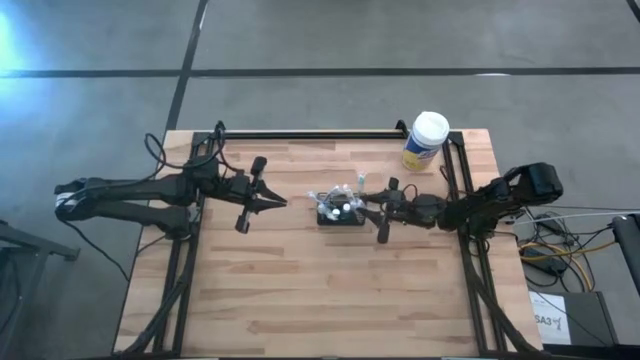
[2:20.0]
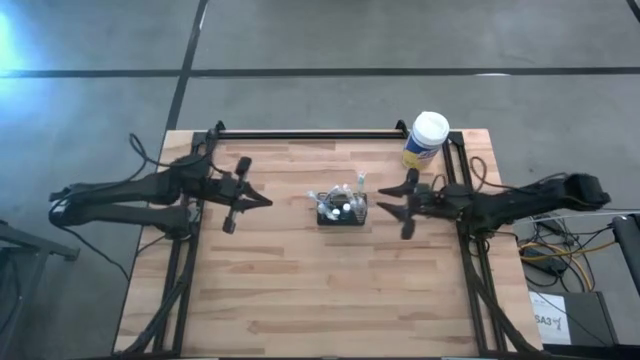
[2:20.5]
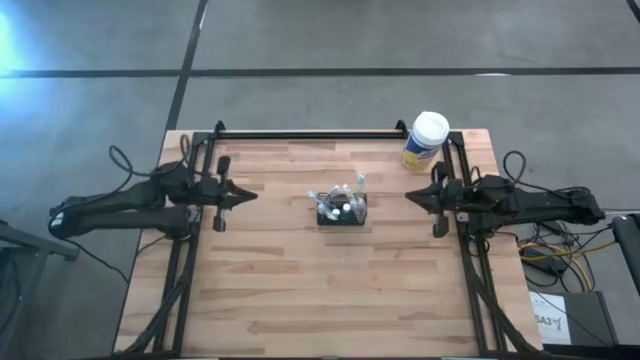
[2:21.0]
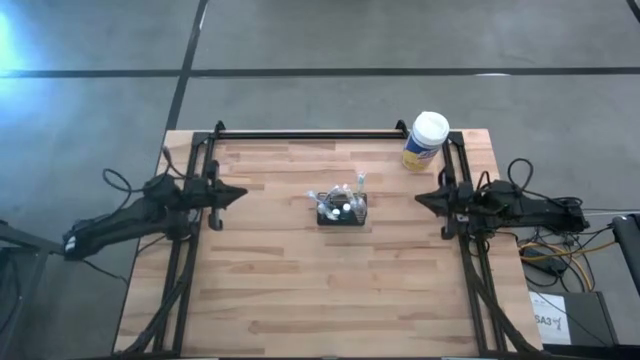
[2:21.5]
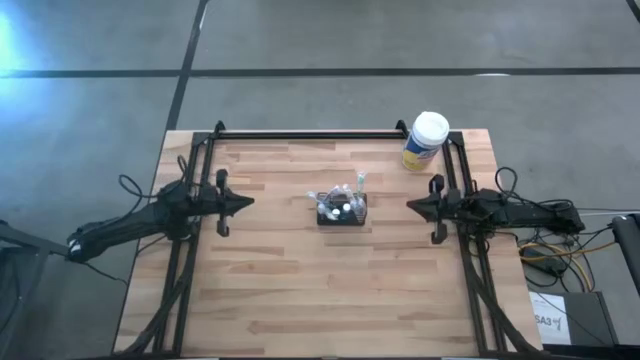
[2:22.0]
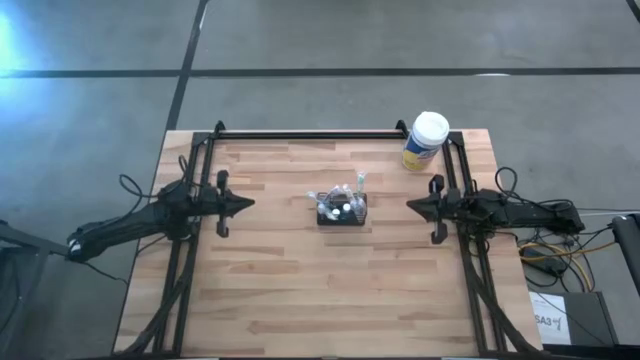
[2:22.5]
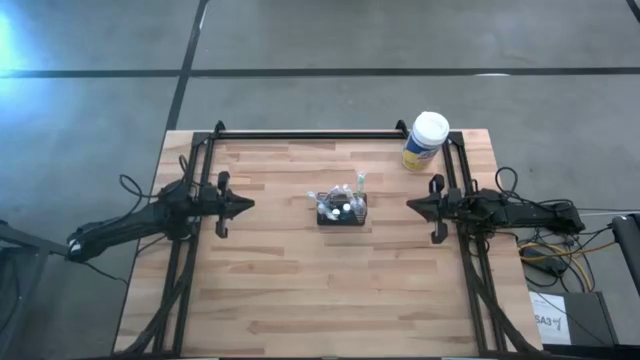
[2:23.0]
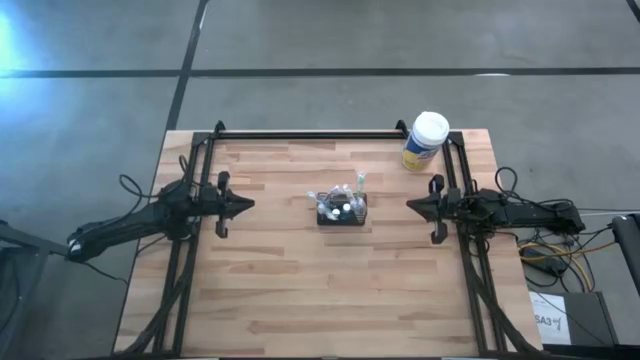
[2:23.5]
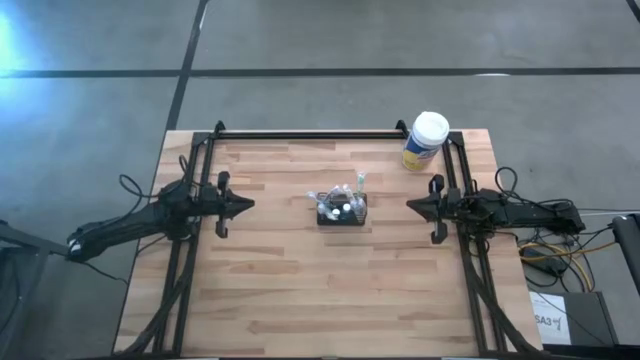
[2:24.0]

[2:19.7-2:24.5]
Task: Pick & Place toothbrushing station
Return to Home Position

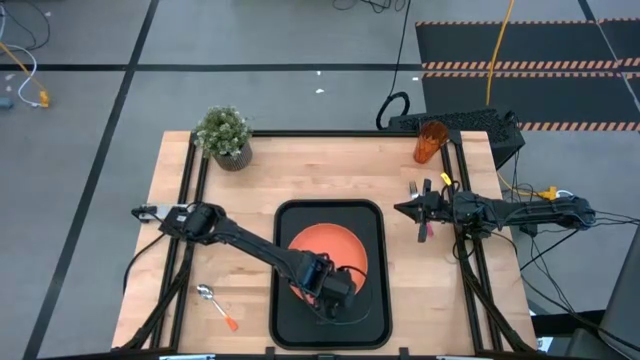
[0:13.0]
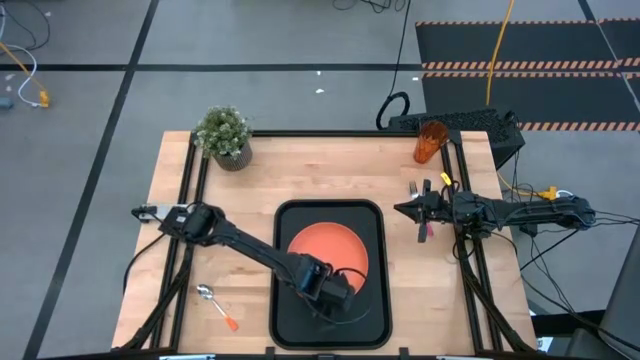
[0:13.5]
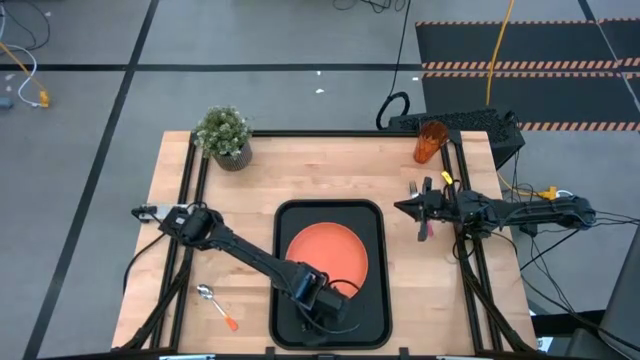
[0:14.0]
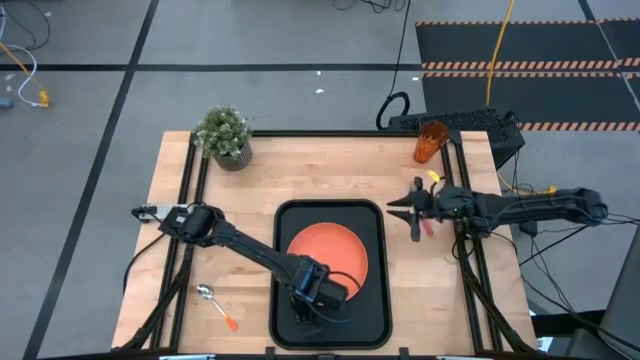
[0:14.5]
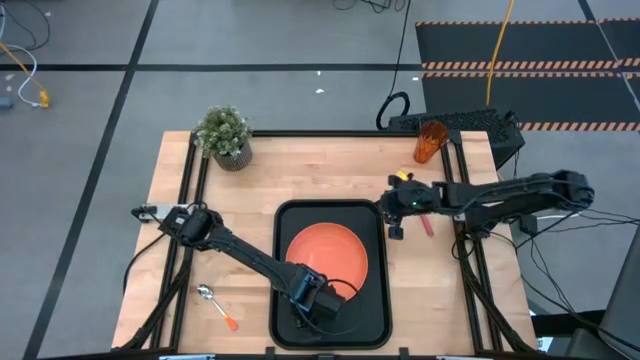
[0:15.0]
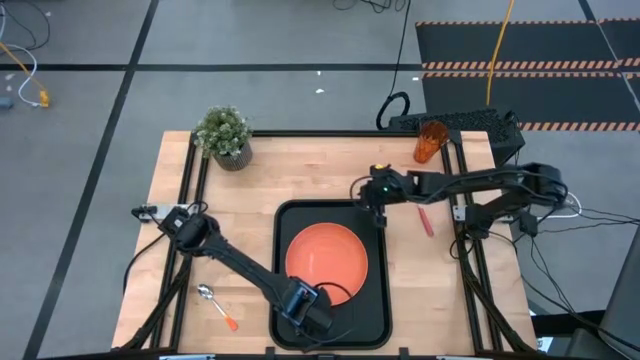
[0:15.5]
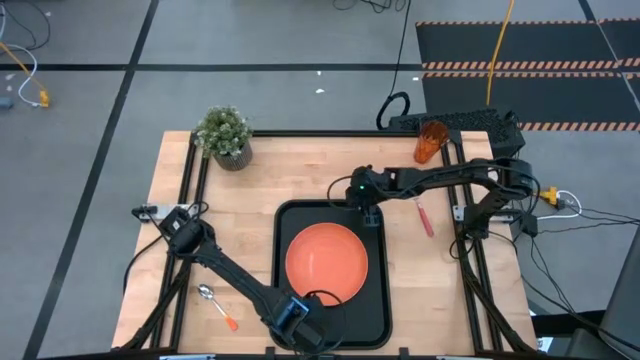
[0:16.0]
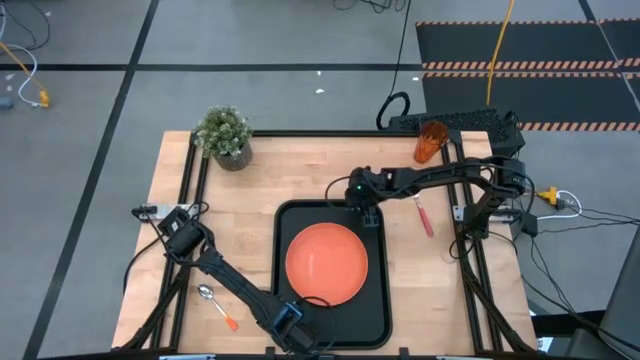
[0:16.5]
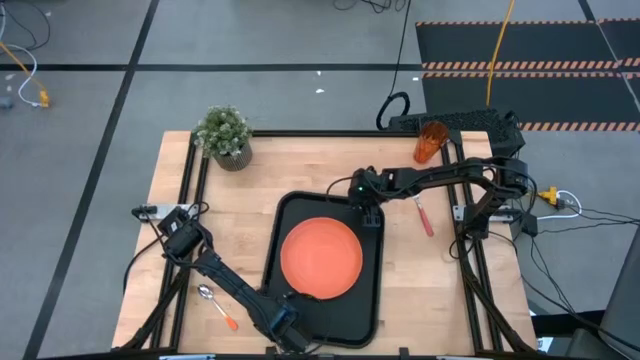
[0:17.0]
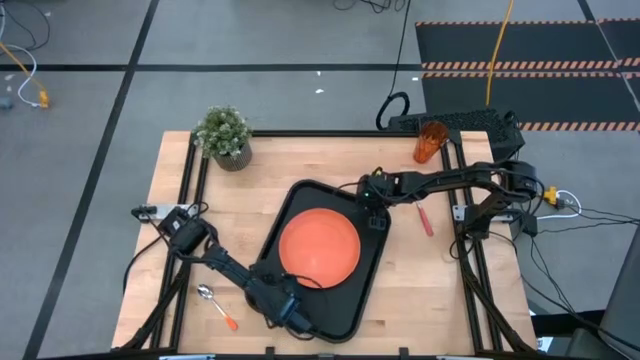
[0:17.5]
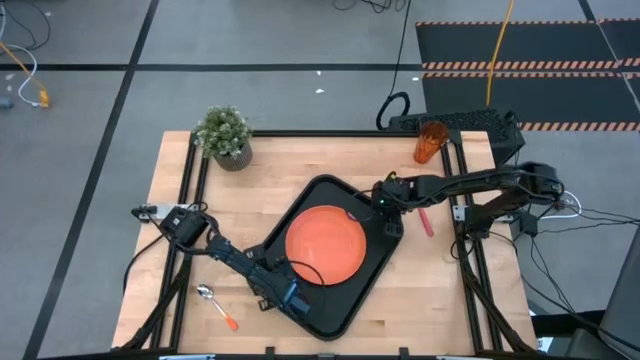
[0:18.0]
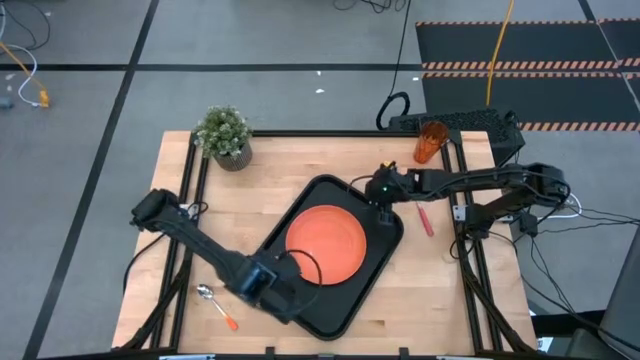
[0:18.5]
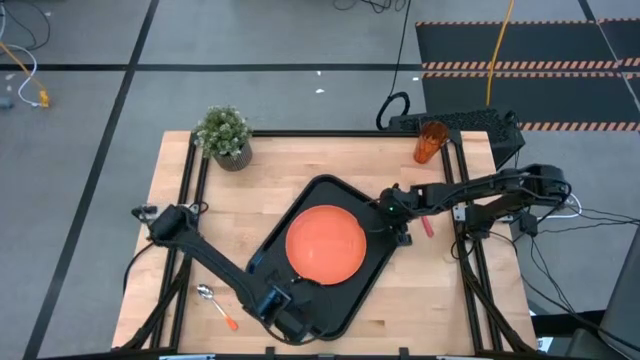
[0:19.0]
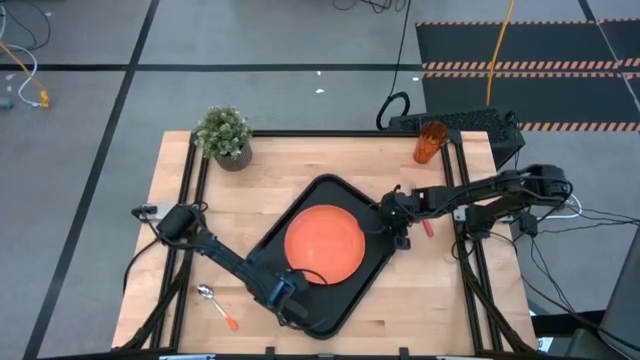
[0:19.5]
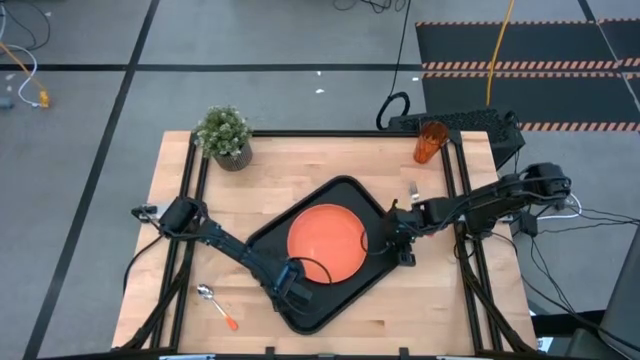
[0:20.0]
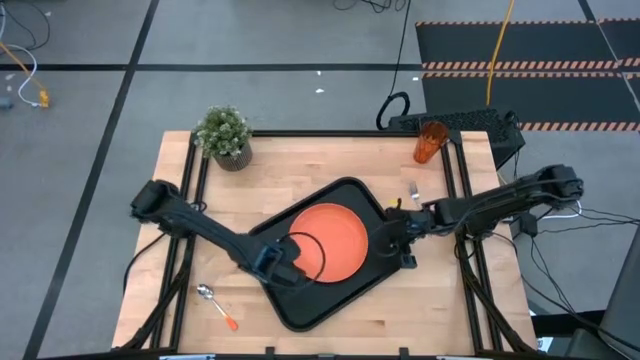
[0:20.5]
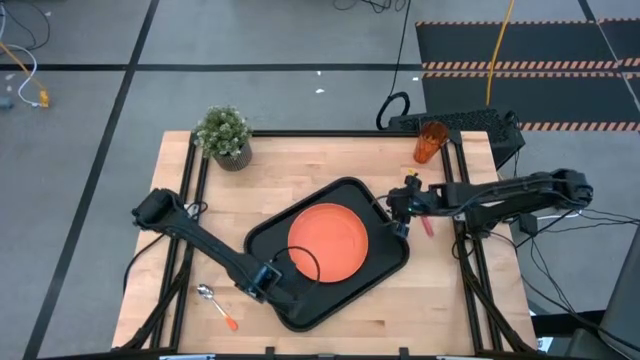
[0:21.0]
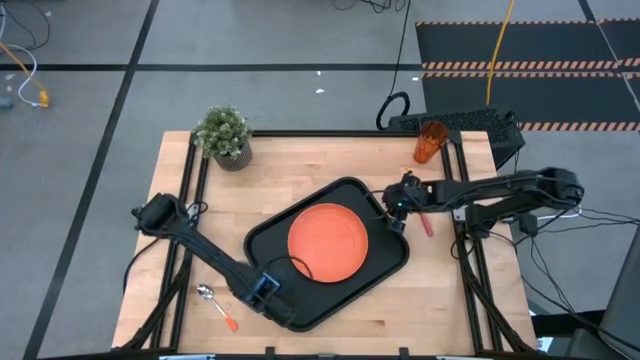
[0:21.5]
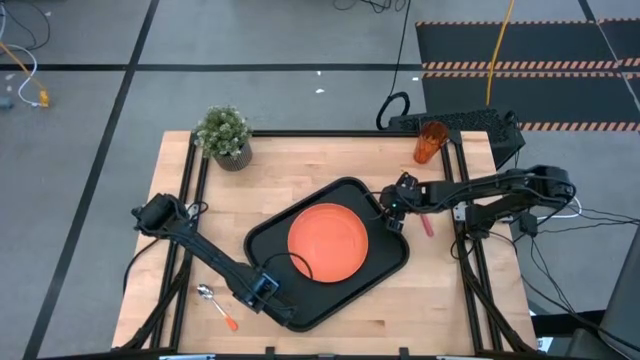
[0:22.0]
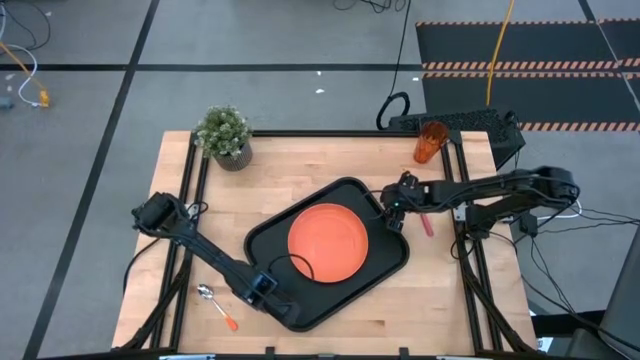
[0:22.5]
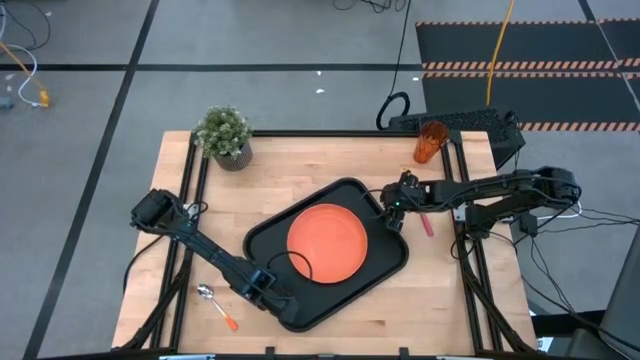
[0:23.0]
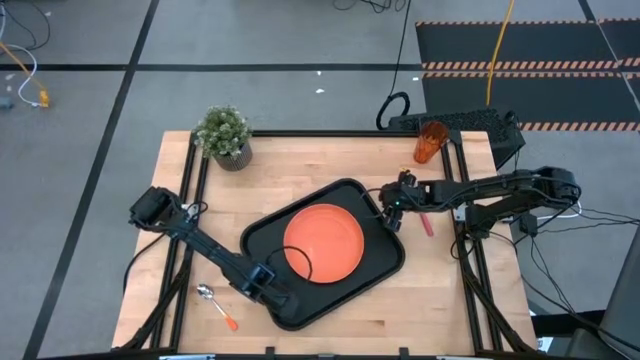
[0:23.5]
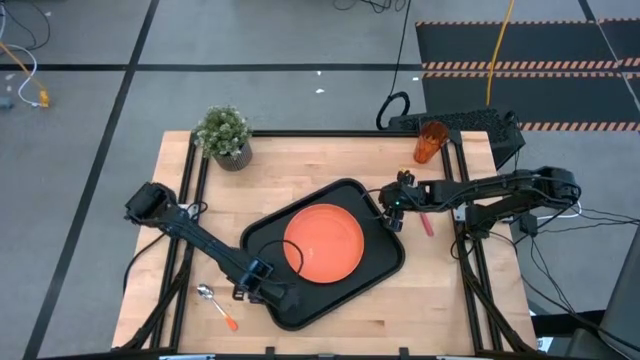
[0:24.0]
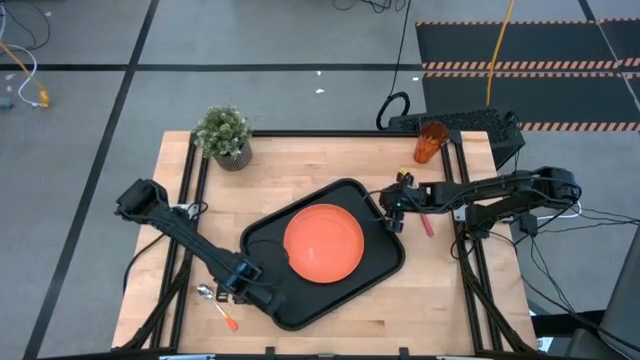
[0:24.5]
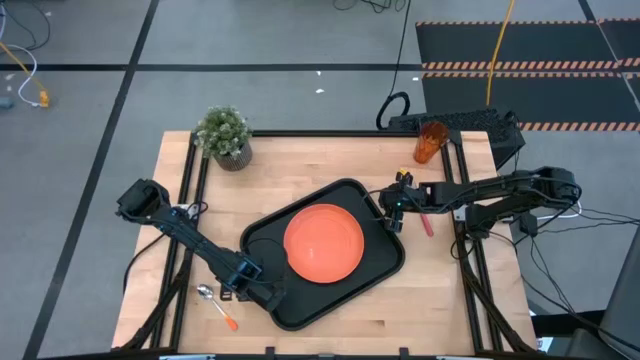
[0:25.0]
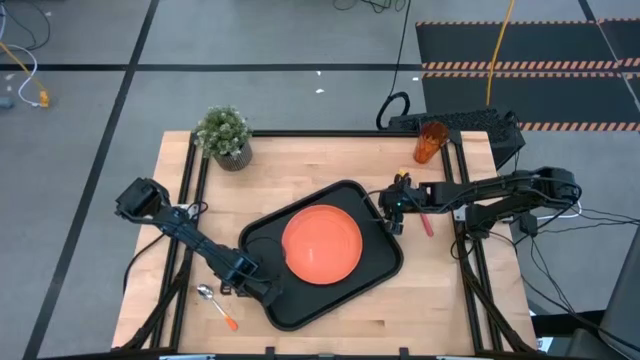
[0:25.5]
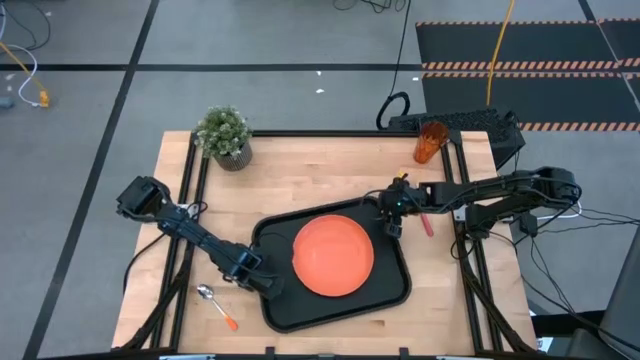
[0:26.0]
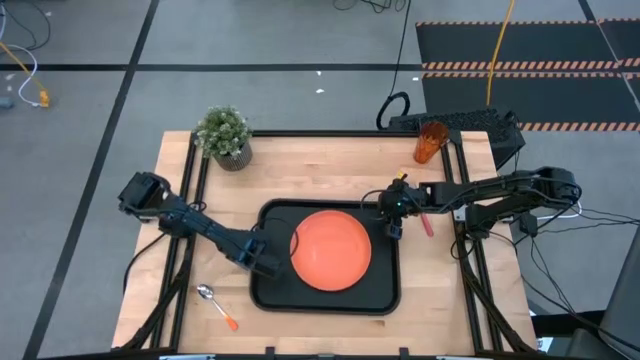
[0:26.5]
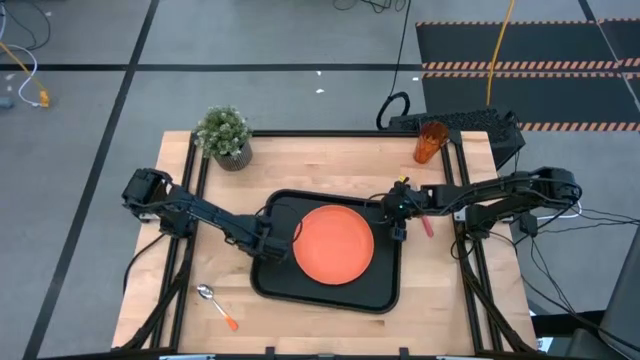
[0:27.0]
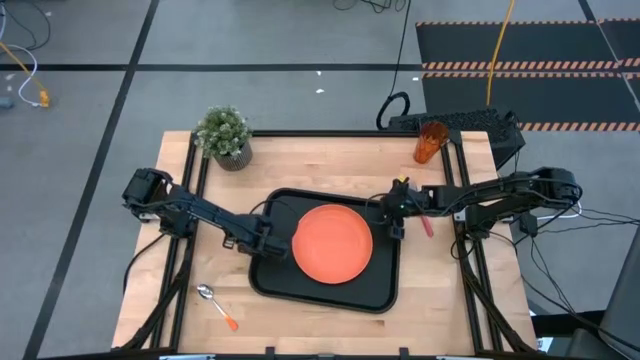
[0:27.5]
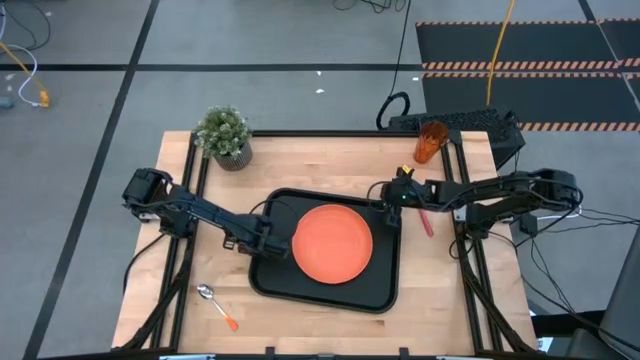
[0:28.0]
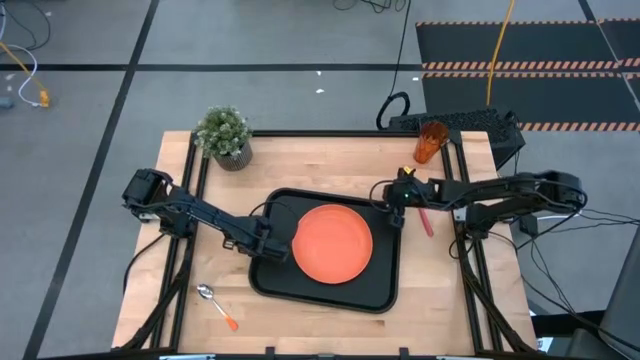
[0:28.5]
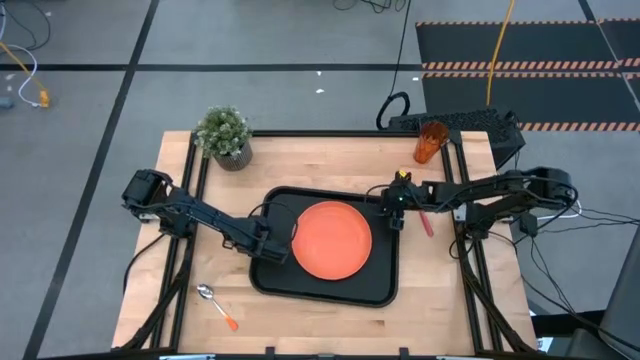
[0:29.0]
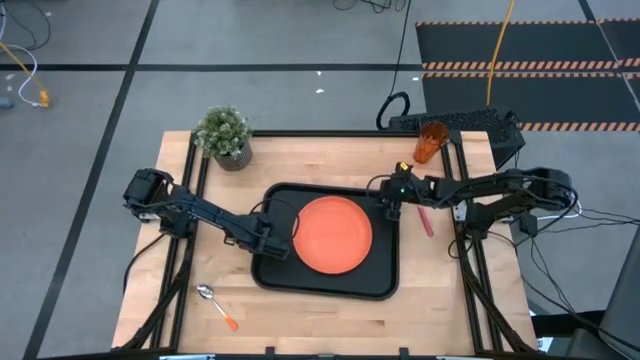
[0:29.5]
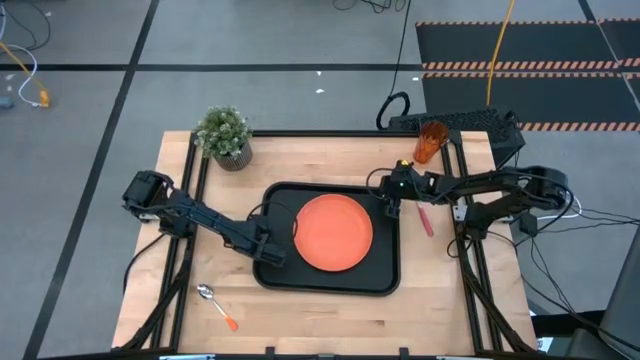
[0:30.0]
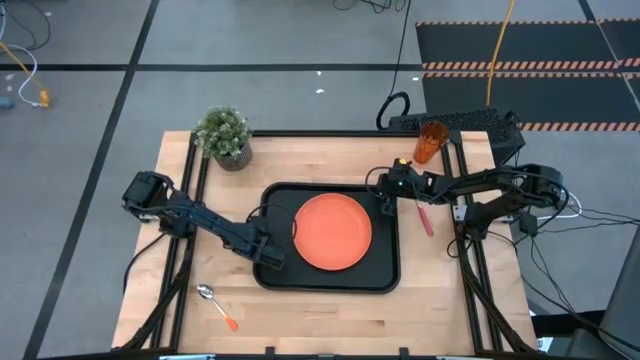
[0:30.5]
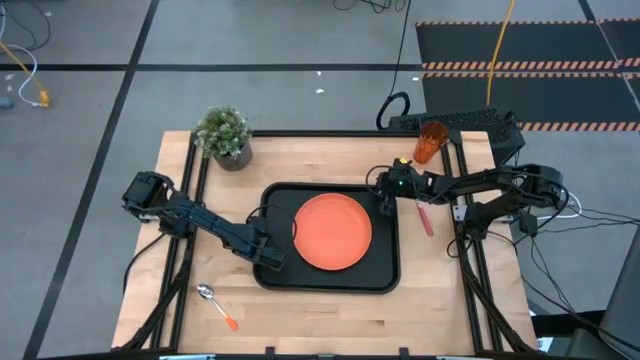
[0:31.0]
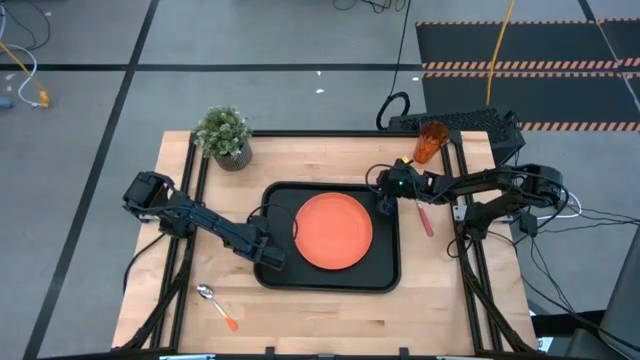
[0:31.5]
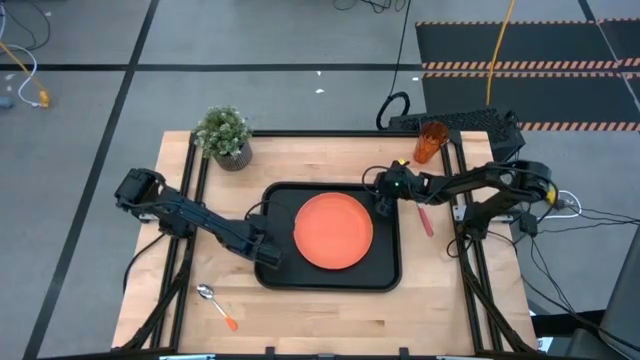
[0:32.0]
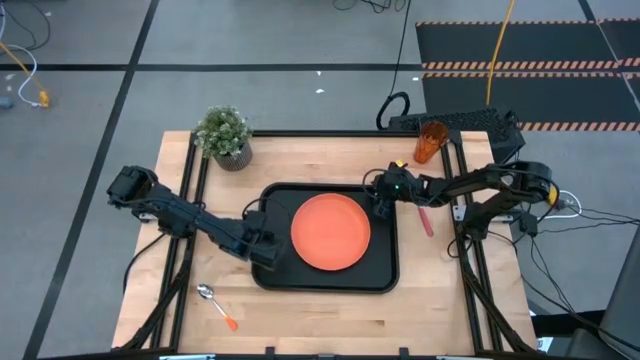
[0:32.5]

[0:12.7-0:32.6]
Task: Pick and place plate/cup/fork/spoon on tray
Adjust the black tray on the table
